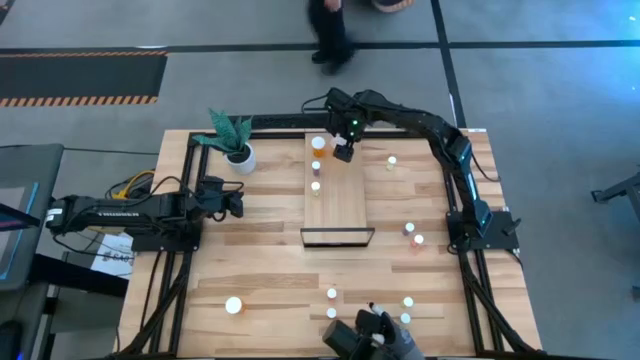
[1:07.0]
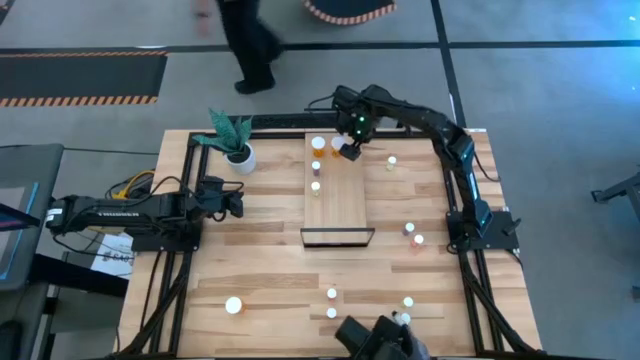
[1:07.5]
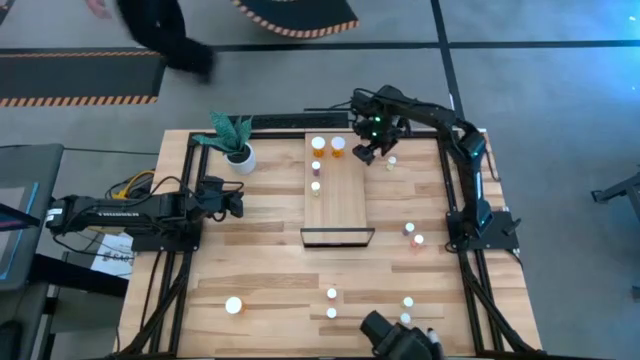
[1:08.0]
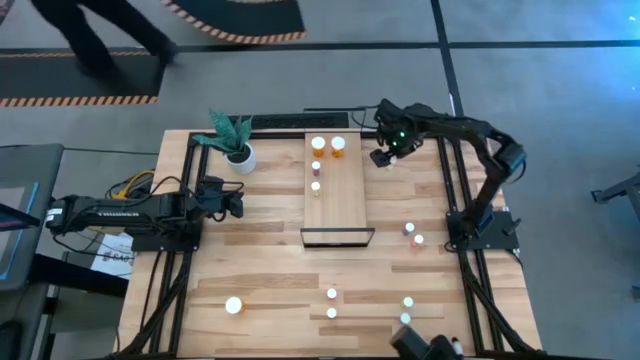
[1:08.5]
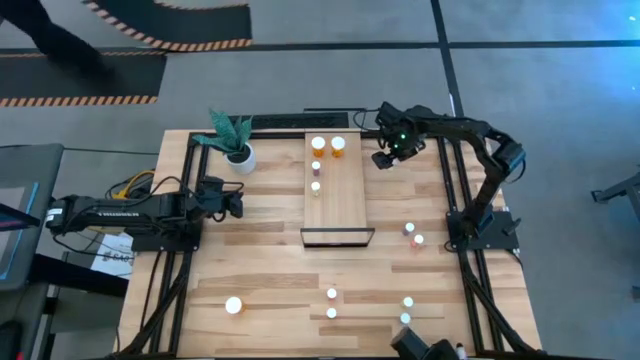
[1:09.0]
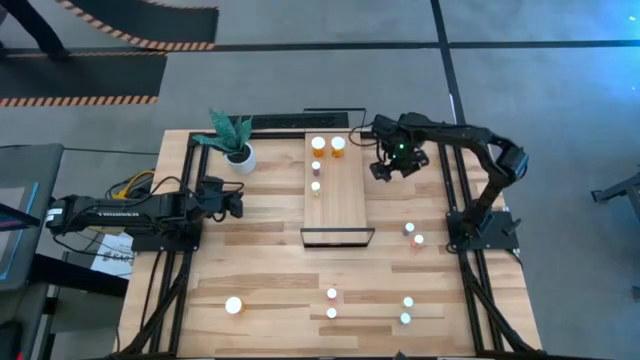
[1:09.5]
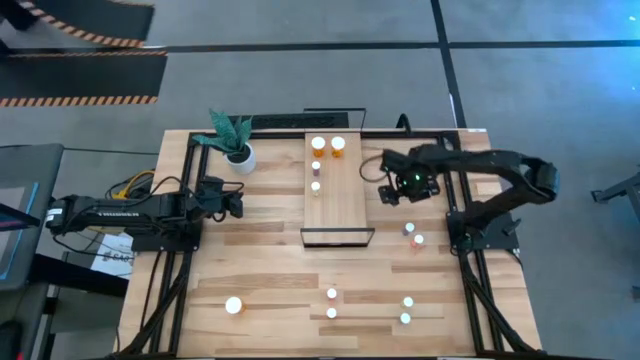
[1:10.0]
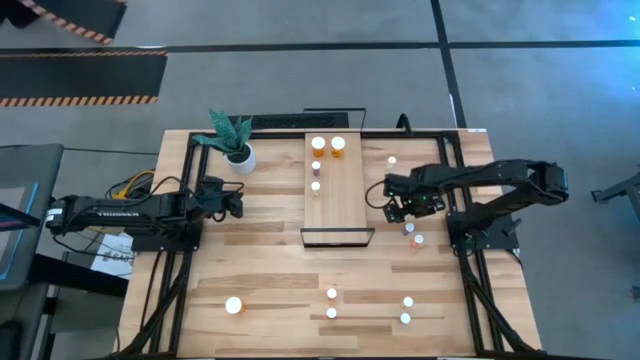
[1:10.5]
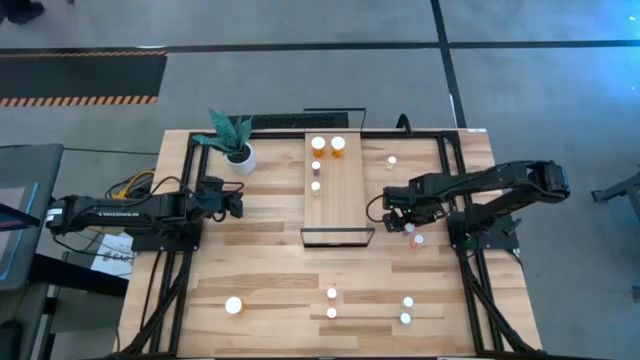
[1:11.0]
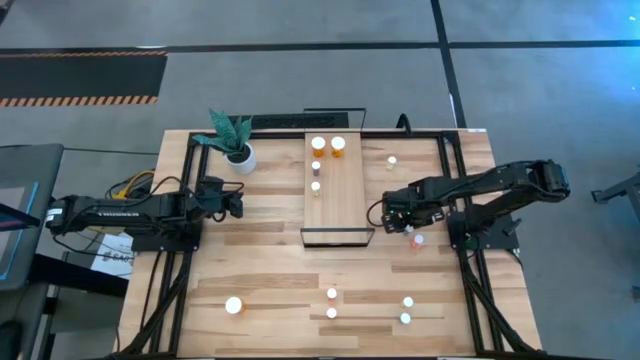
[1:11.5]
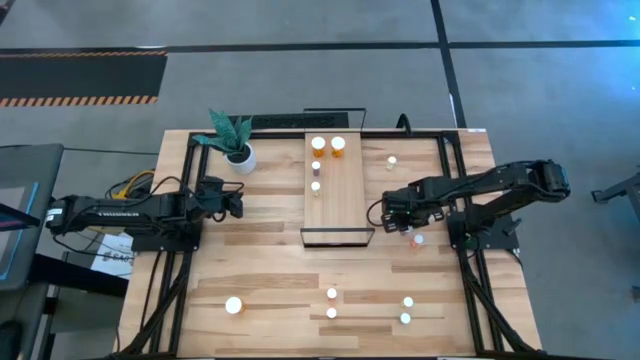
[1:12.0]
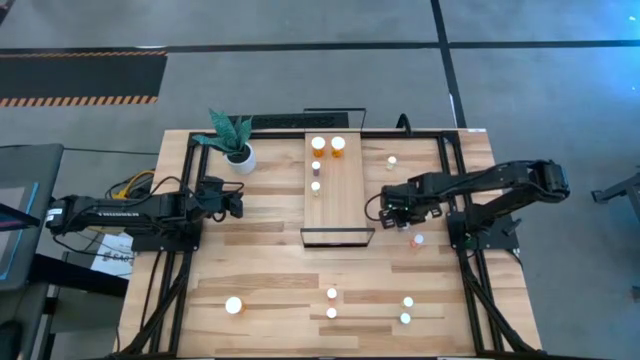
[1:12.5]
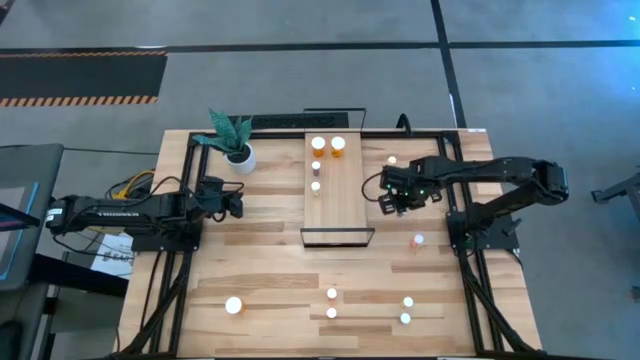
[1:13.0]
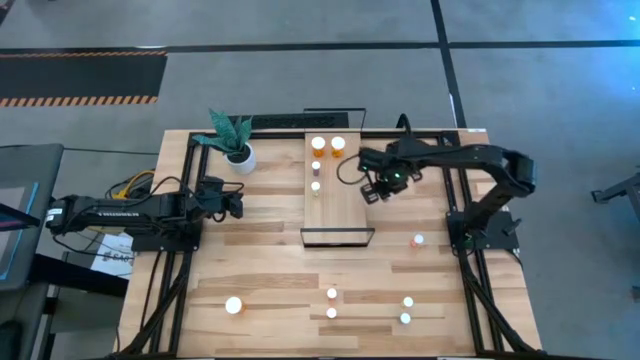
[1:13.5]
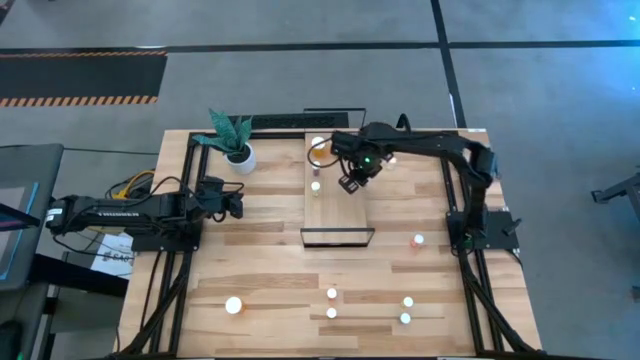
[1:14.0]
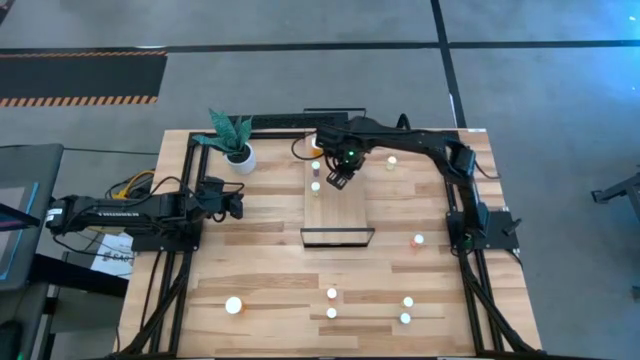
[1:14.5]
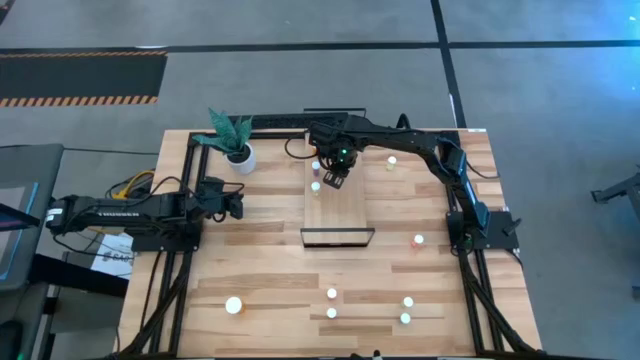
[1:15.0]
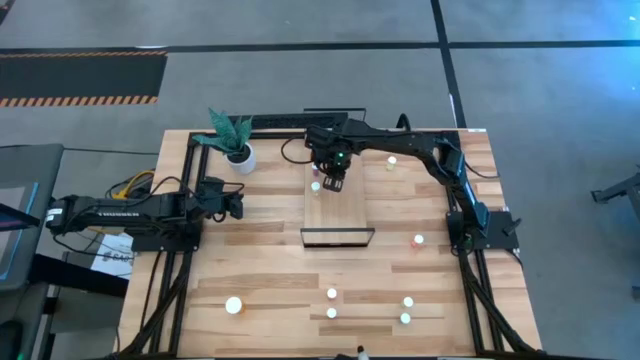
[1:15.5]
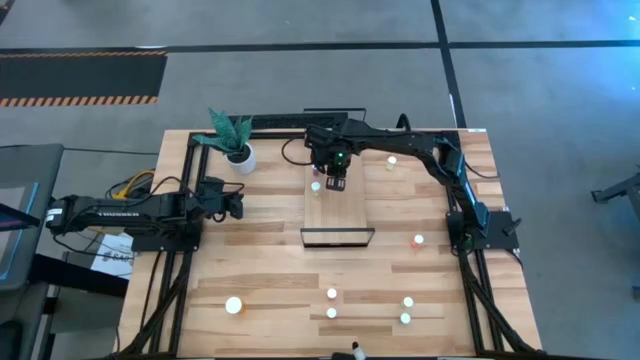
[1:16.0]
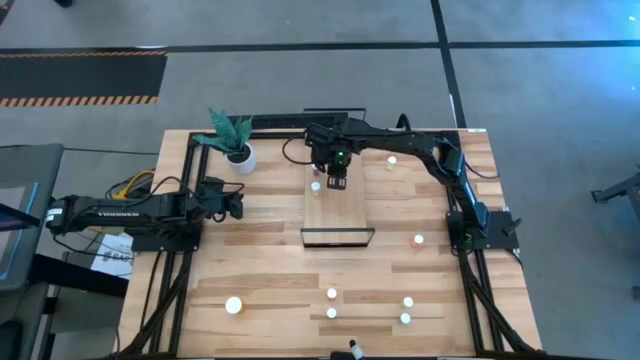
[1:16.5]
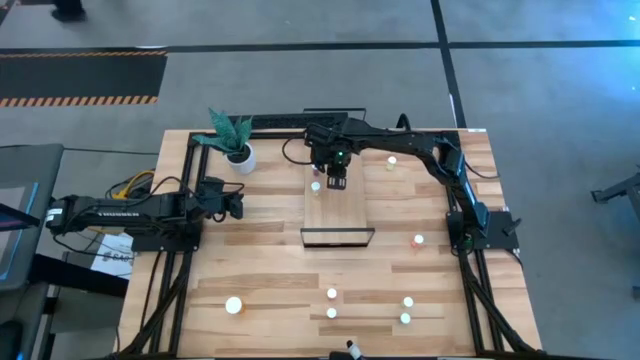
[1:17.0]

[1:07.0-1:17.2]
Task: Pick and place medicine bottles onto shelf by color
Put the top blue pill bottle on the shelf aligned with the other blue pill bottle

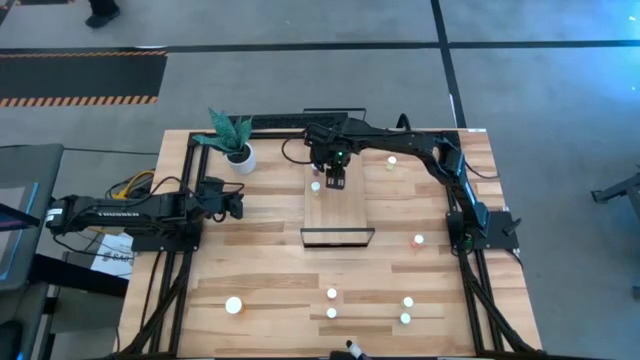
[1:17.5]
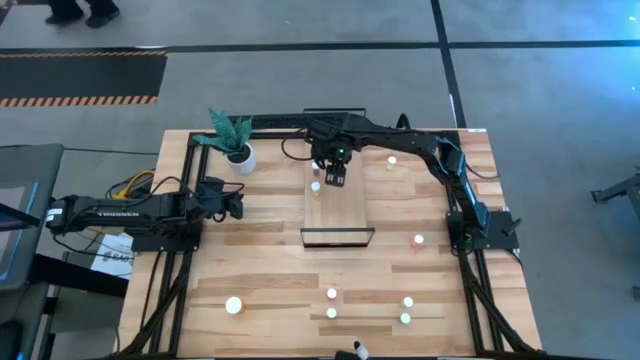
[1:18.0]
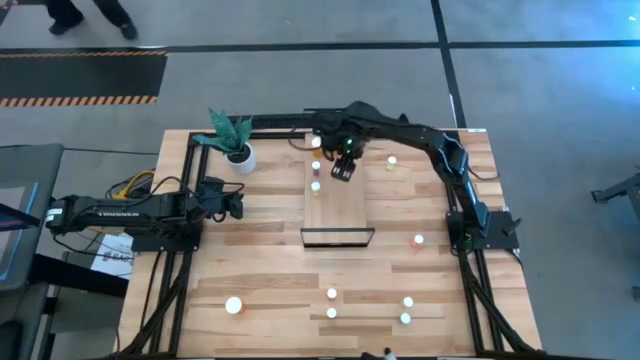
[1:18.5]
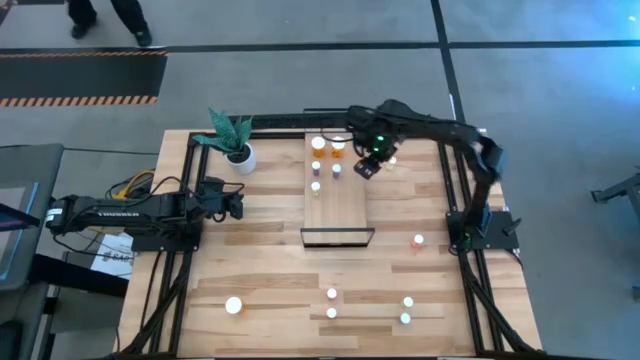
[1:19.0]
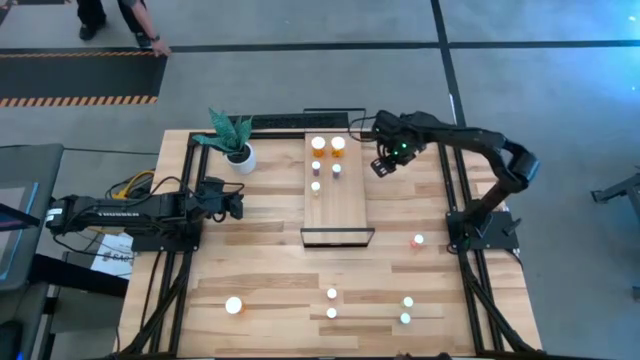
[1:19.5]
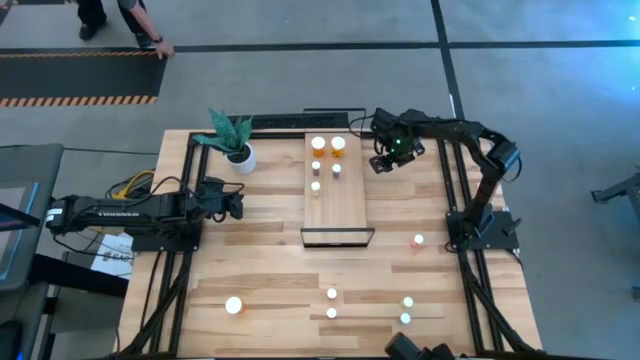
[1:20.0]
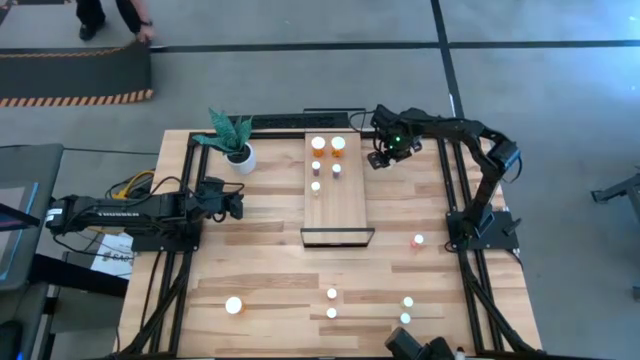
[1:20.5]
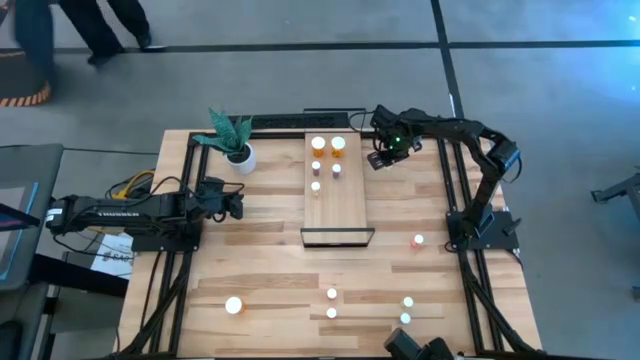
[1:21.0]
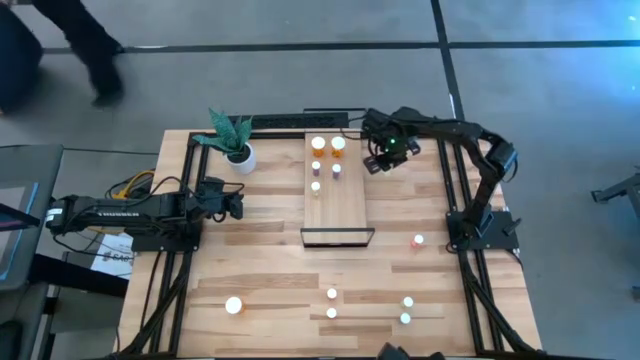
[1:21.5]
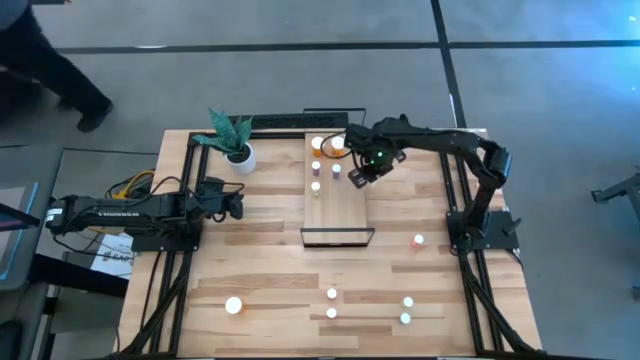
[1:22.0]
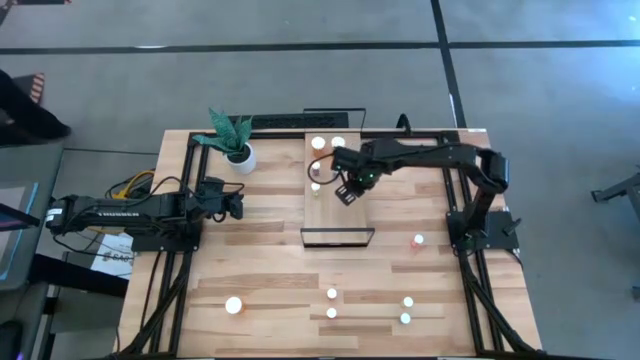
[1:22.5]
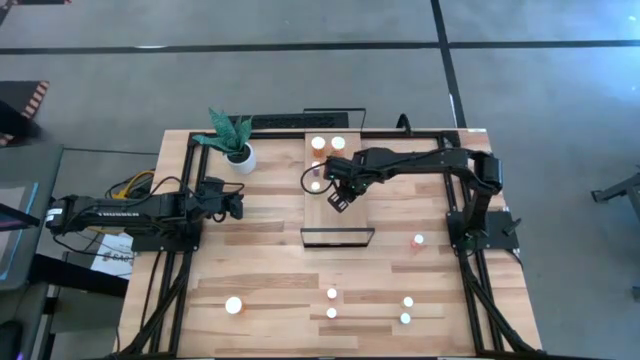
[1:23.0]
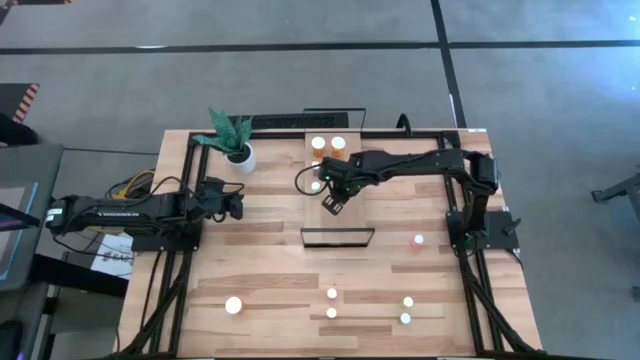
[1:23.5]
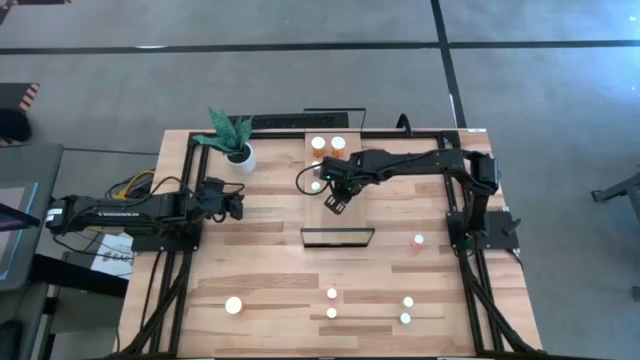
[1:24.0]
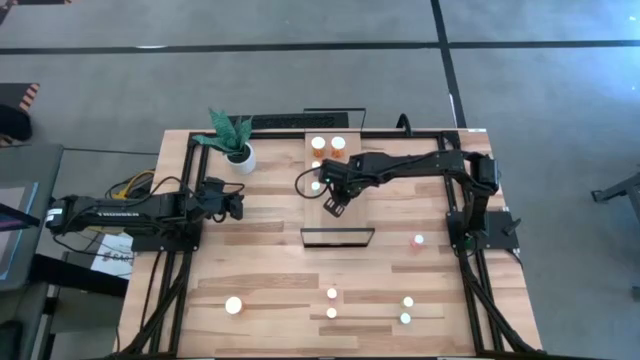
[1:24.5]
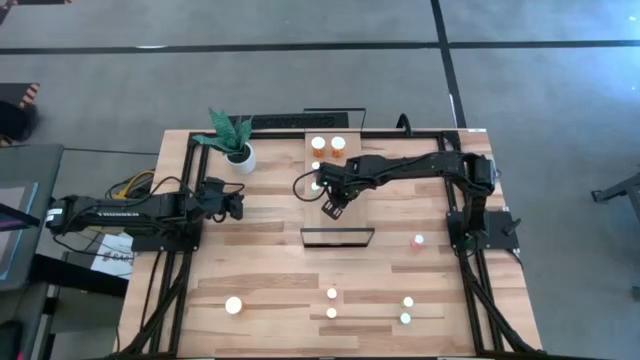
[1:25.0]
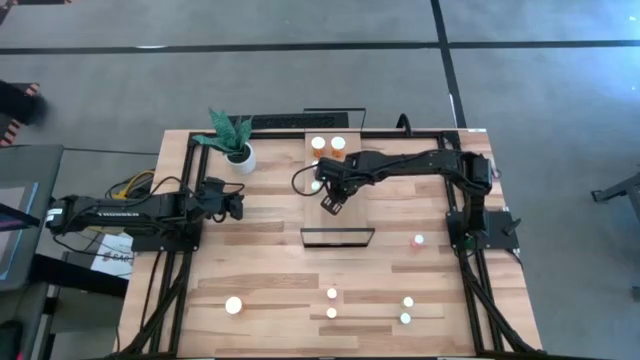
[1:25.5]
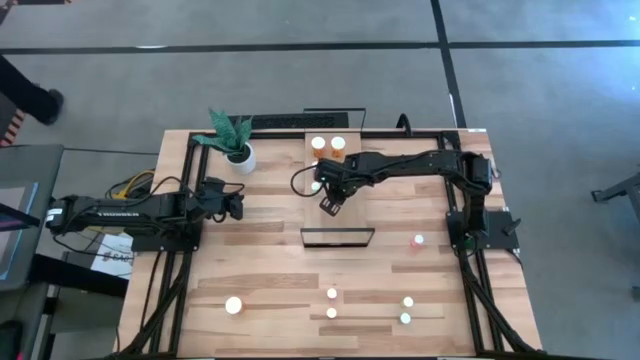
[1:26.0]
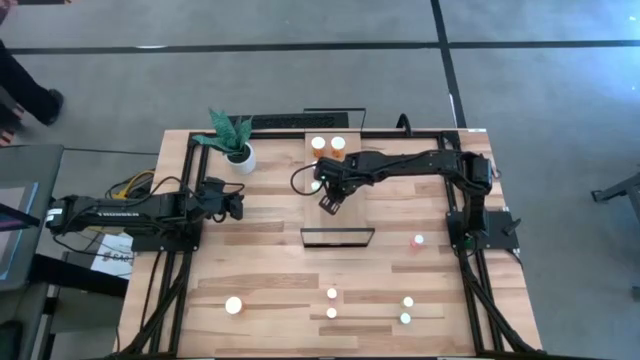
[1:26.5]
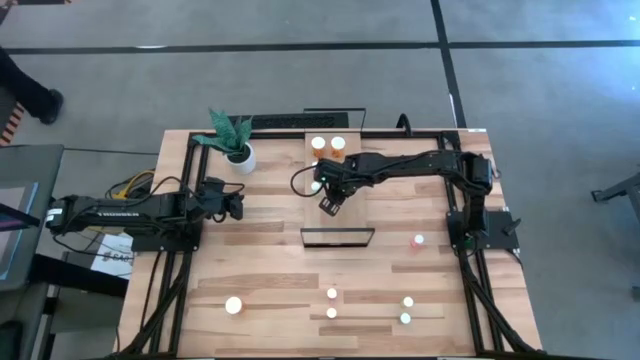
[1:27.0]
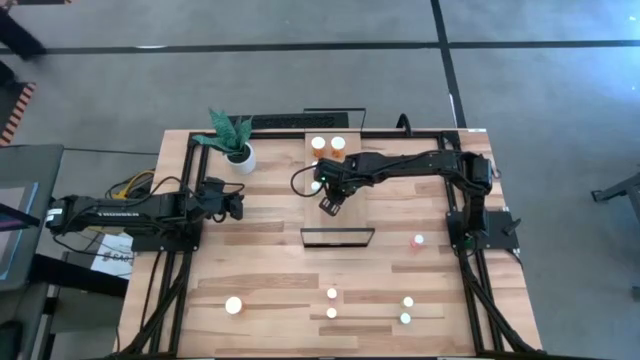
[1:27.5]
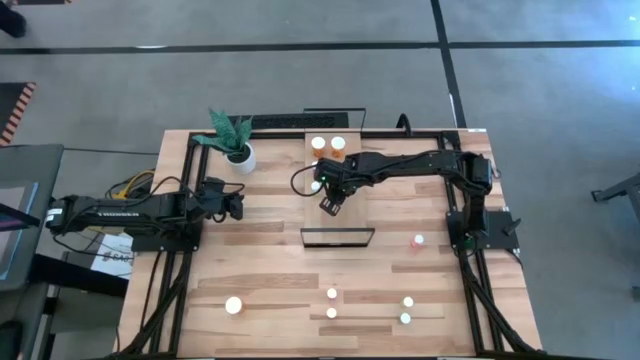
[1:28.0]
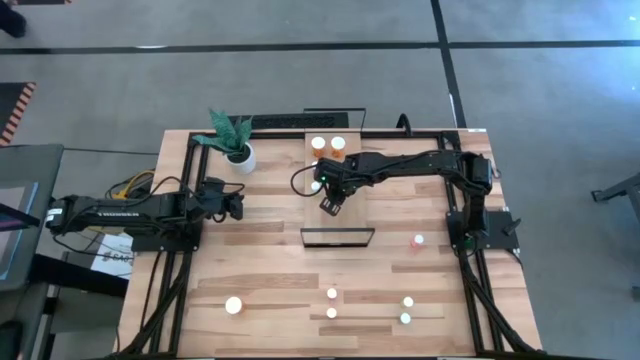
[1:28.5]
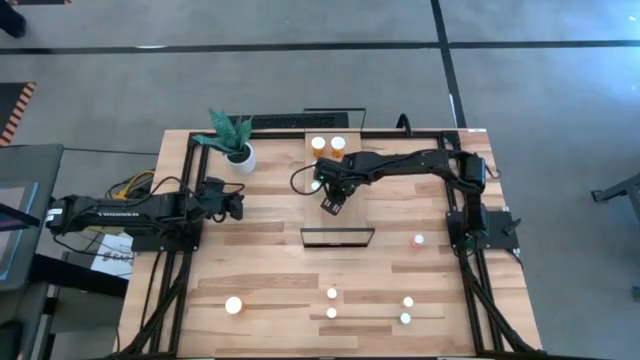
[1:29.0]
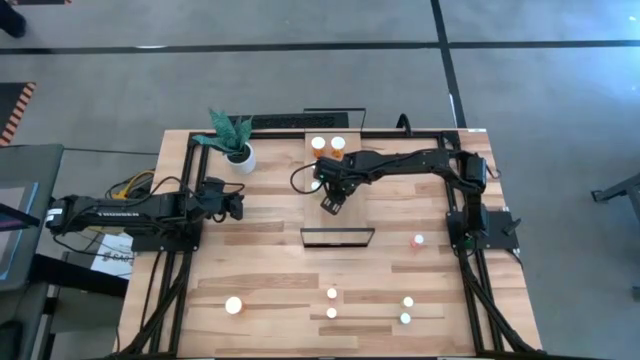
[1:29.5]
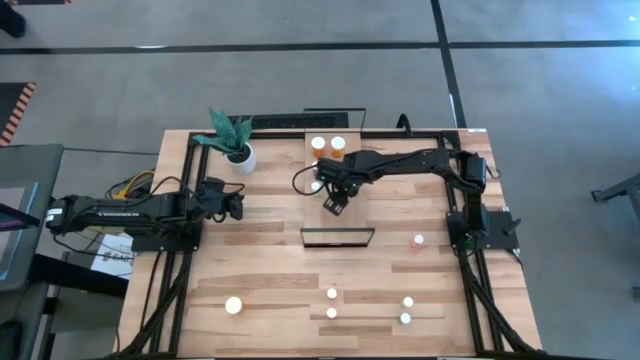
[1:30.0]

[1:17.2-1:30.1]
Put the top yellow pill bottle aligned with the other yellow pill bottle on the shelf
